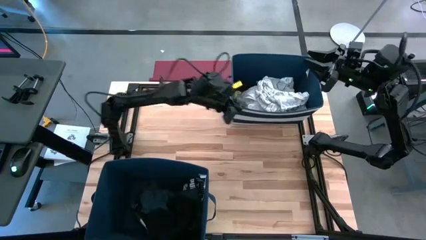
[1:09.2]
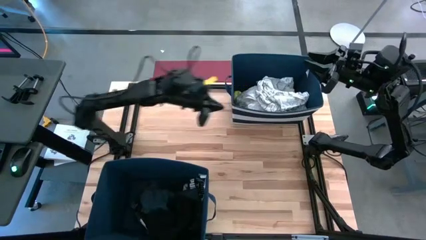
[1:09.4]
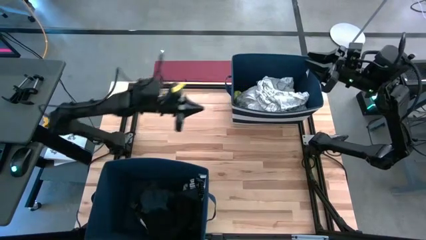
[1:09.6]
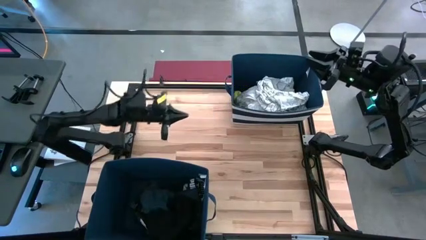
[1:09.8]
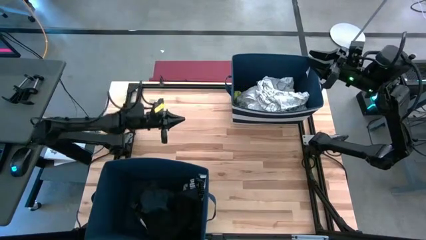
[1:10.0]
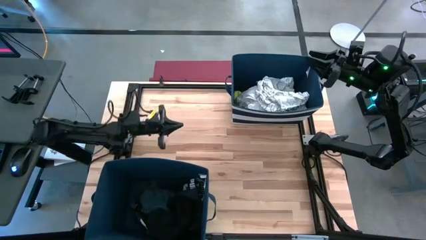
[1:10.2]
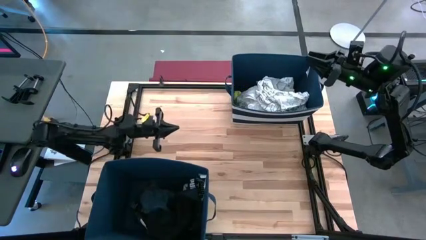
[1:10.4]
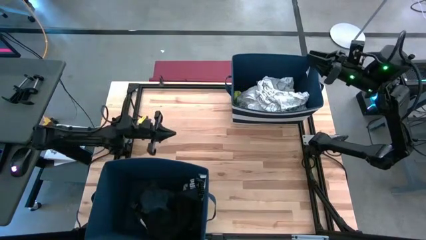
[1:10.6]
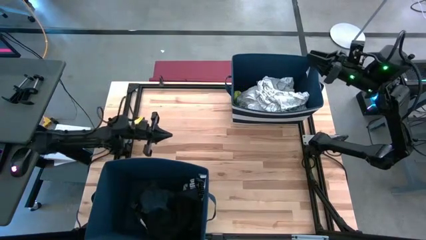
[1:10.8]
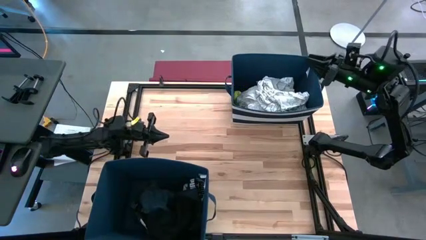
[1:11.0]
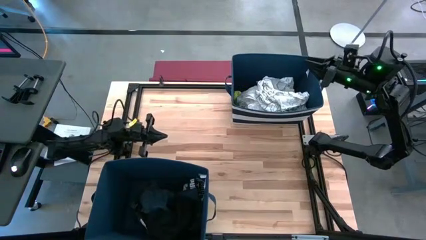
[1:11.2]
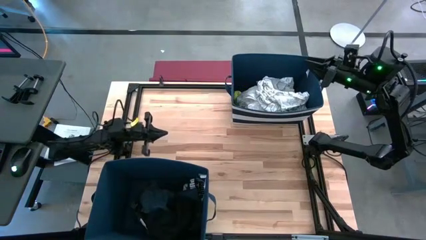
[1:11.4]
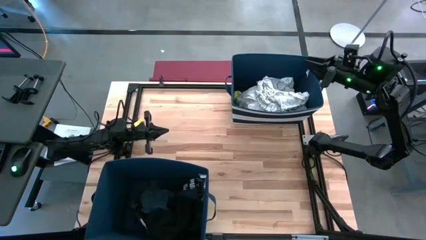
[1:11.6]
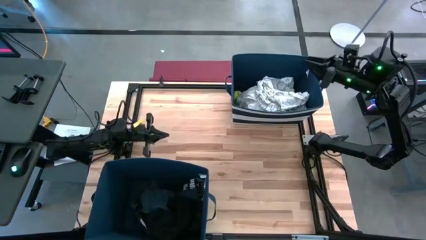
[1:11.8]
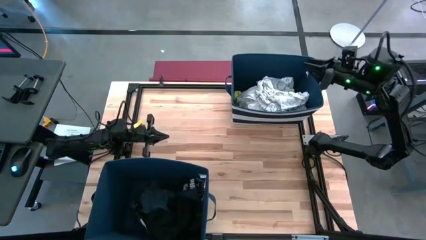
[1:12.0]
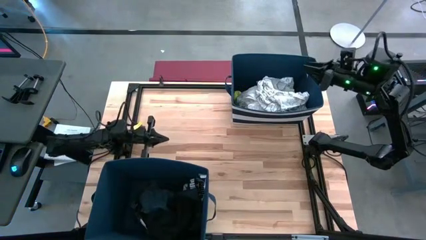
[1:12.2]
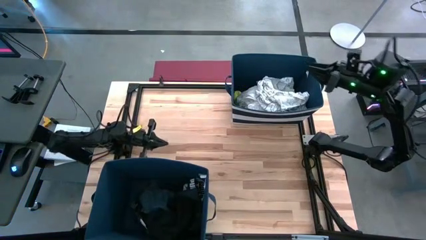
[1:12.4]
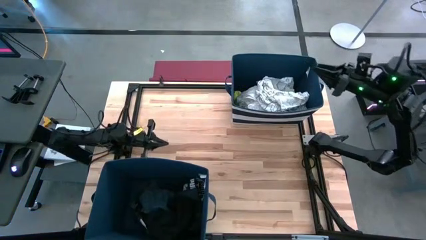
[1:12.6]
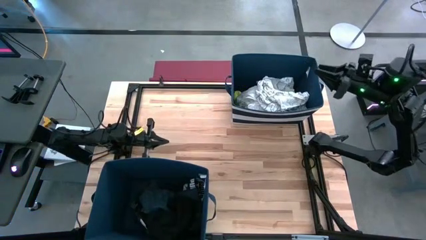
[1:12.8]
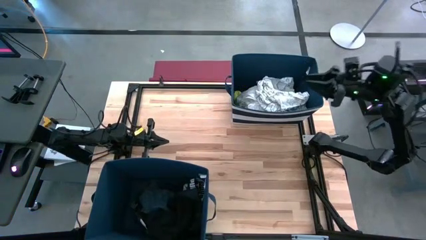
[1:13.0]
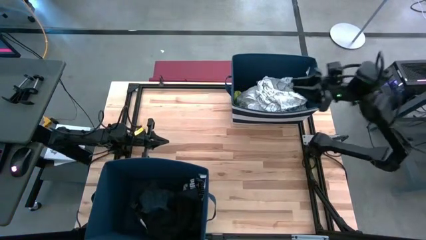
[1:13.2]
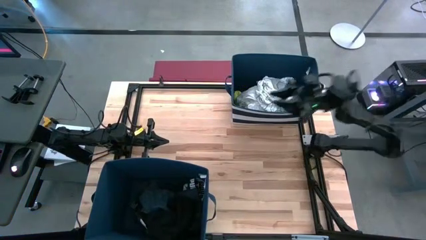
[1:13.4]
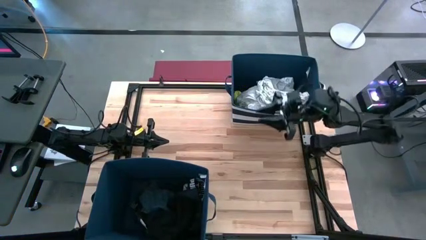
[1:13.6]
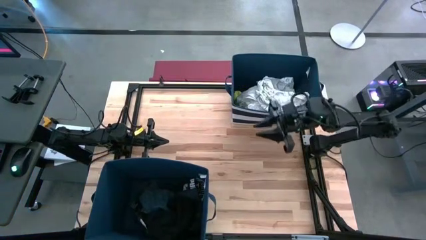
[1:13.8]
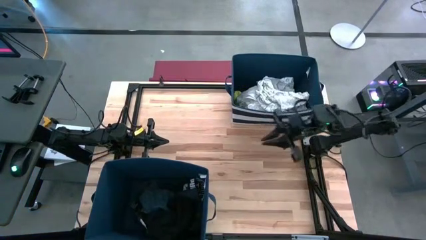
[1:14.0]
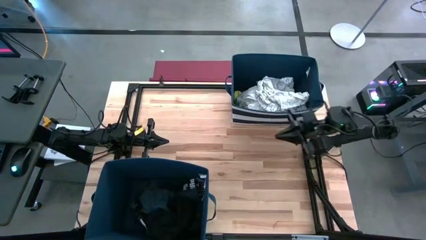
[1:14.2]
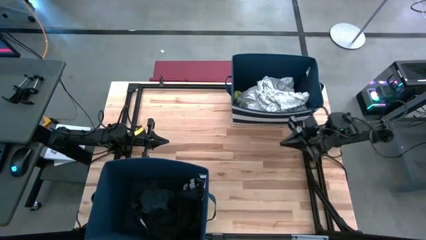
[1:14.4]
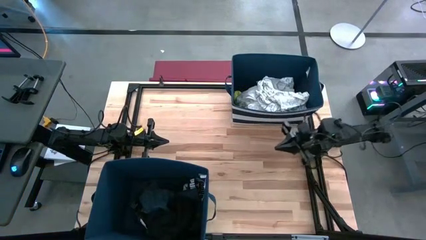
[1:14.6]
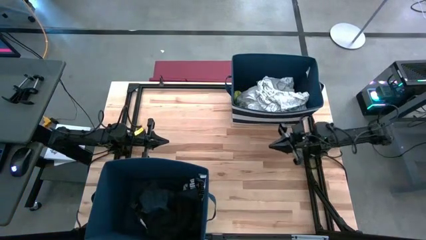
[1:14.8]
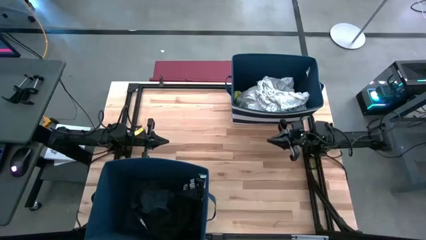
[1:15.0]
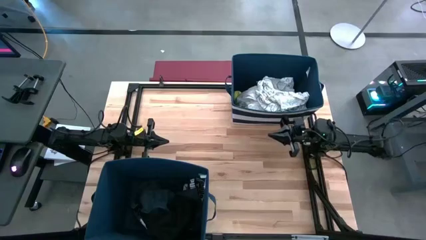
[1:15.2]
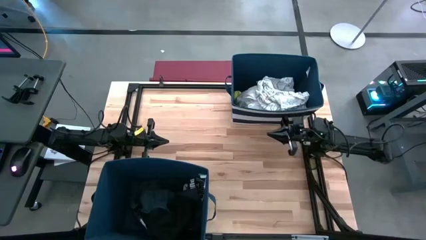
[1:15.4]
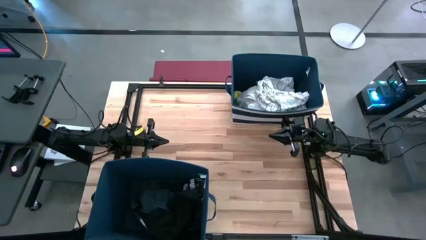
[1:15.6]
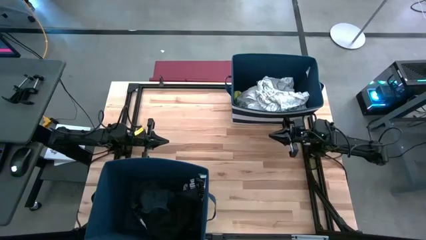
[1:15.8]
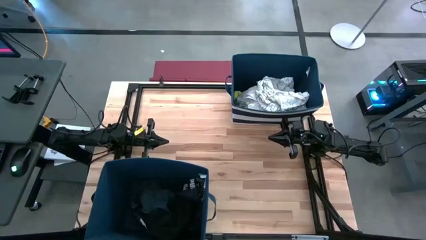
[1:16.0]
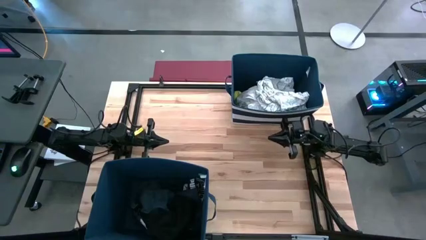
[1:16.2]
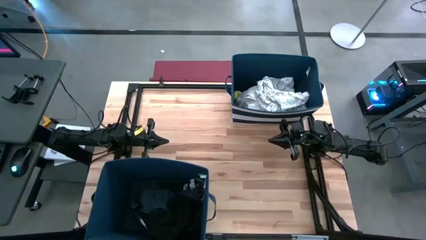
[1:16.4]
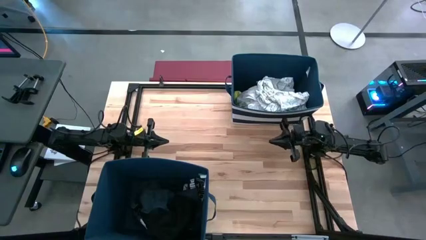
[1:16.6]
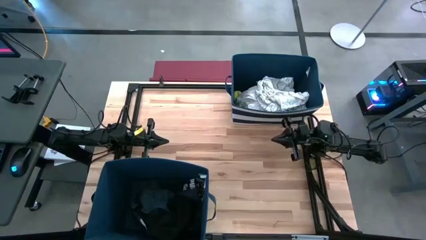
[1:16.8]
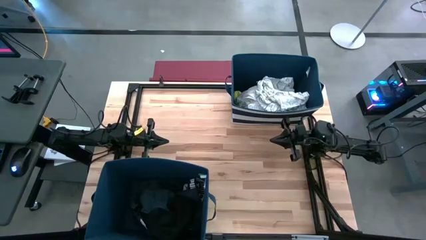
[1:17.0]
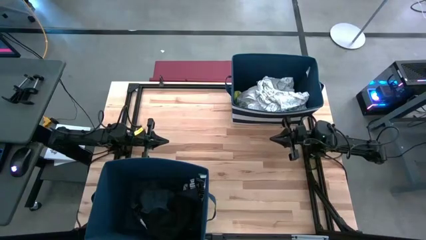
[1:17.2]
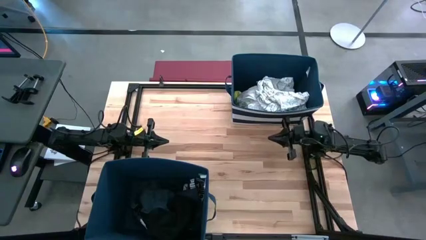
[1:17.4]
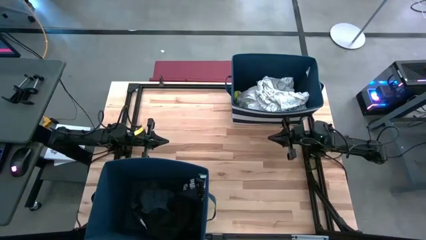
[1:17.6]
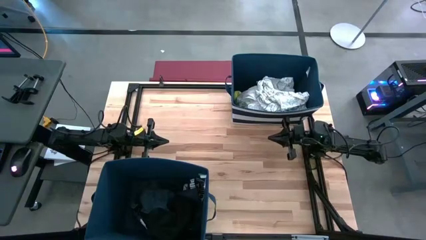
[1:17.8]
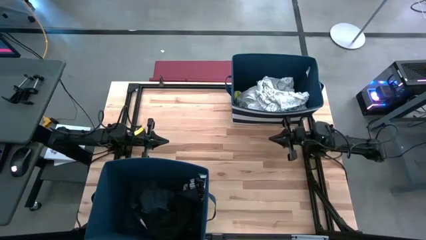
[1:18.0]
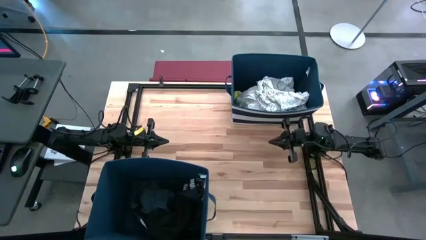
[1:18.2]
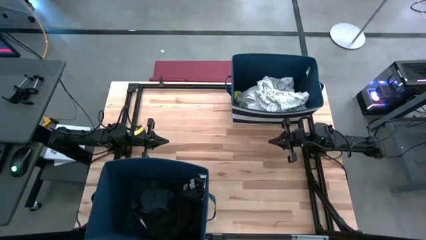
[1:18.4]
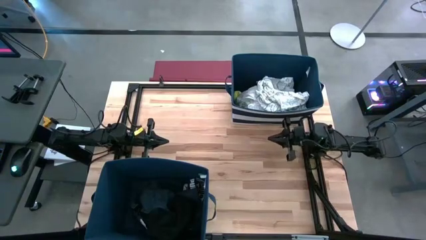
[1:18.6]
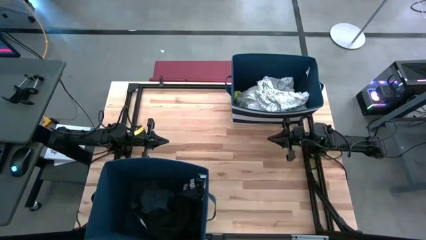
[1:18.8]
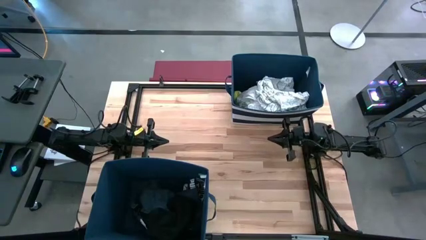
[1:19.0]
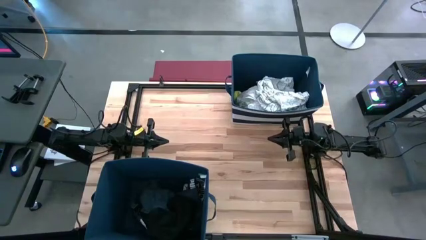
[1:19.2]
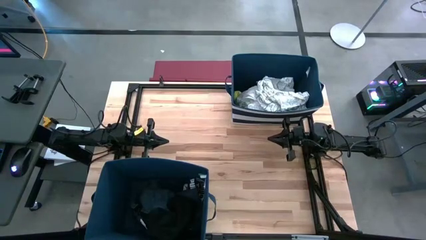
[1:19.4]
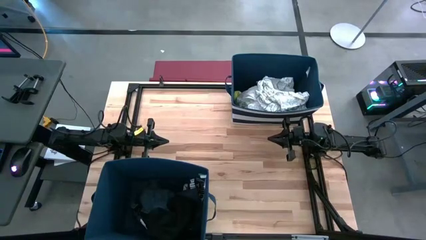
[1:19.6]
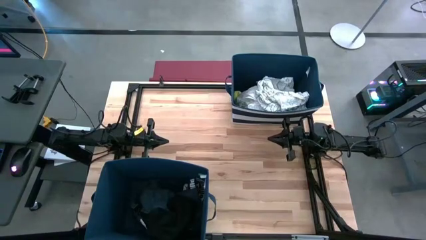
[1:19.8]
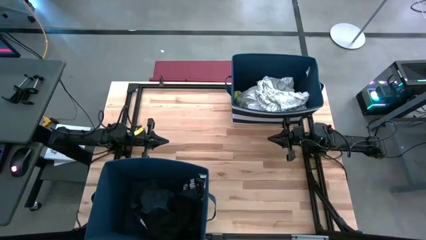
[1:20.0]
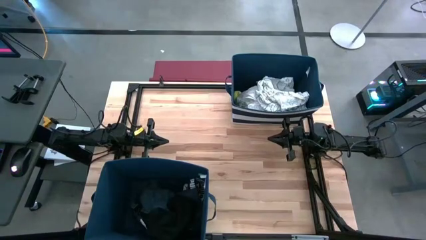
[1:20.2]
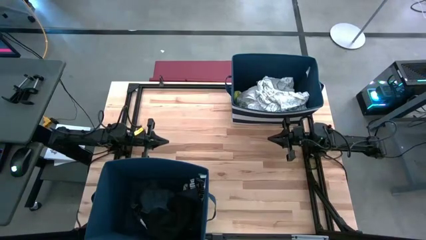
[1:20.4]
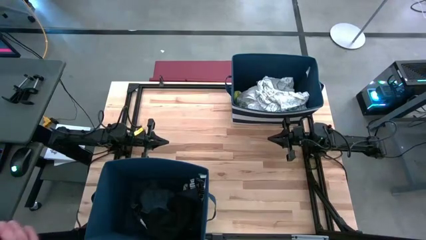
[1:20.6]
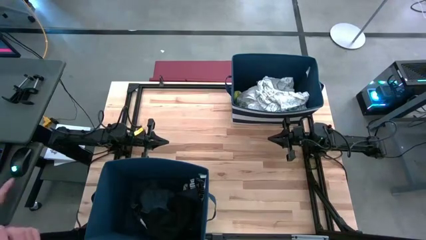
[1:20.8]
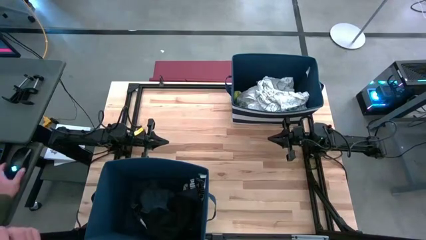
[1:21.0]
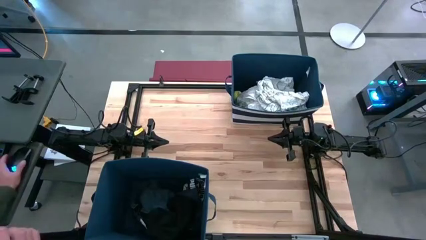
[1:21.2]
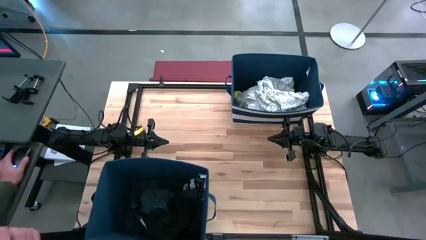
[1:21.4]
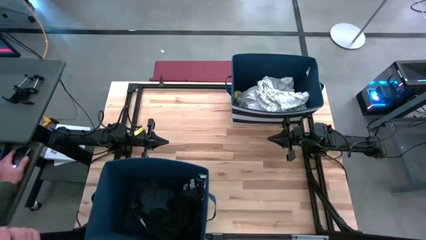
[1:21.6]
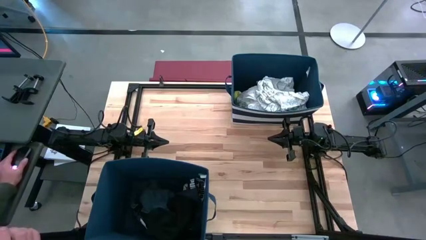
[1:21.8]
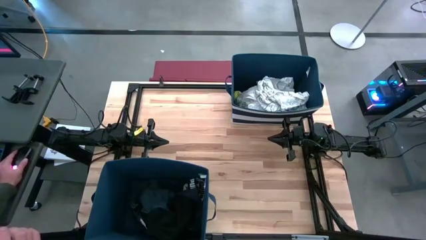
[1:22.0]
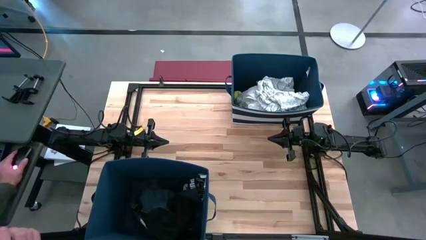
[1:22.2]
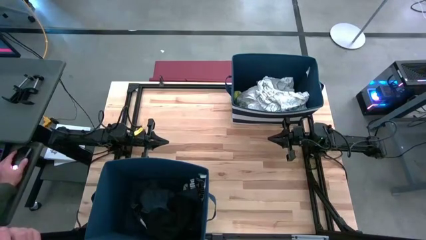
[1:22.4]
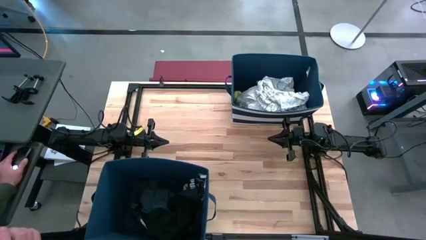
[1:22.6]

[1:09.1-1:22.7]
Task: Sort clothes
Return to Home Position

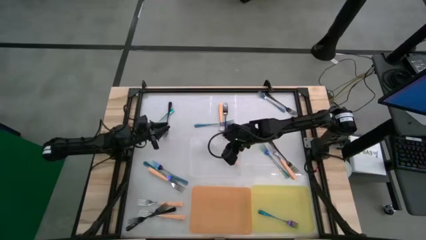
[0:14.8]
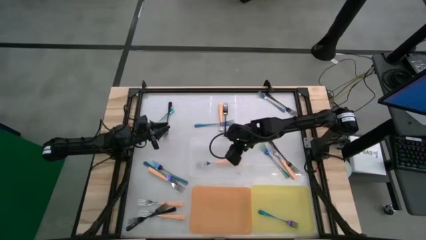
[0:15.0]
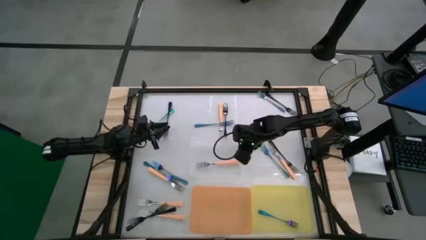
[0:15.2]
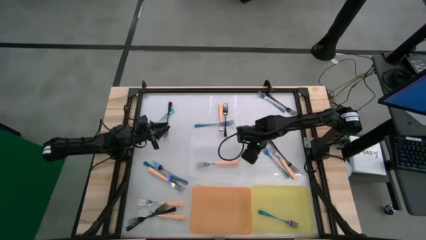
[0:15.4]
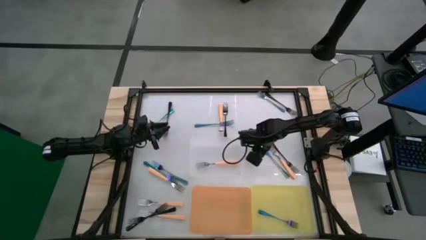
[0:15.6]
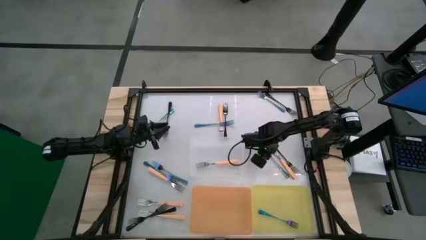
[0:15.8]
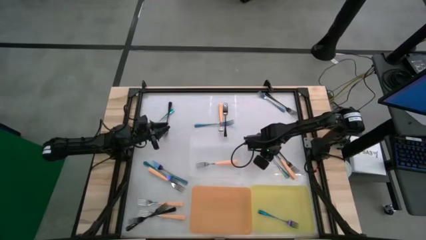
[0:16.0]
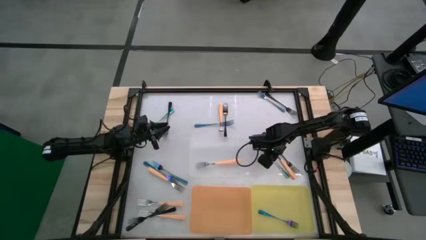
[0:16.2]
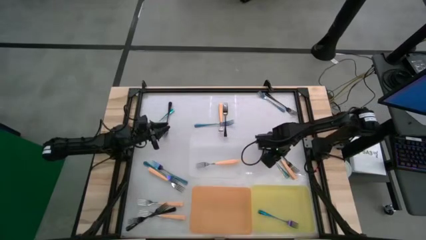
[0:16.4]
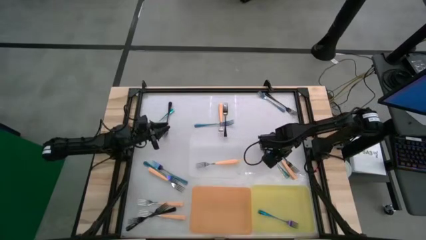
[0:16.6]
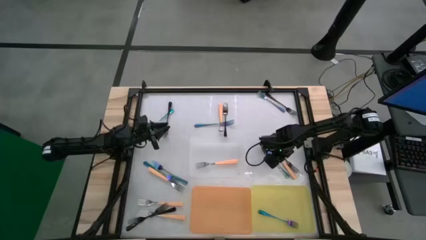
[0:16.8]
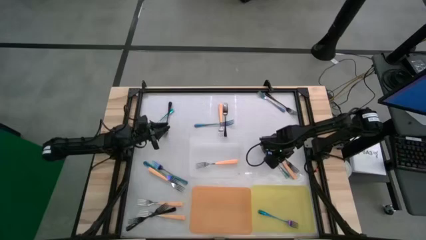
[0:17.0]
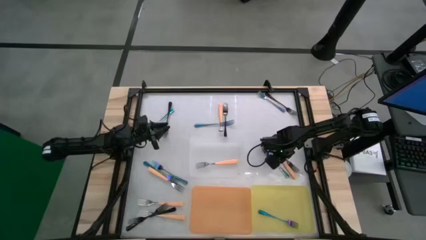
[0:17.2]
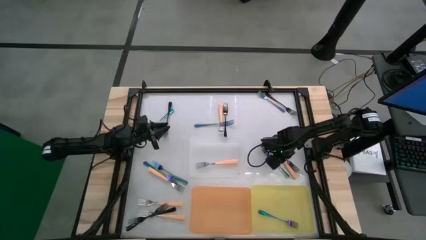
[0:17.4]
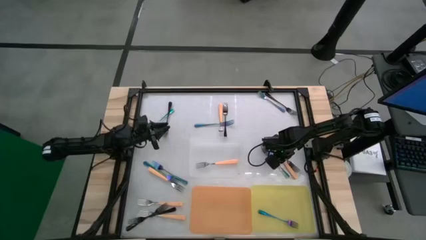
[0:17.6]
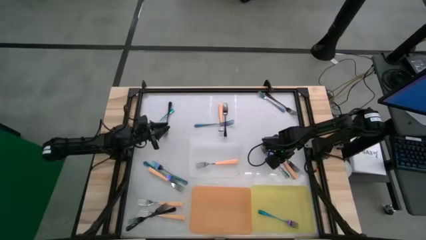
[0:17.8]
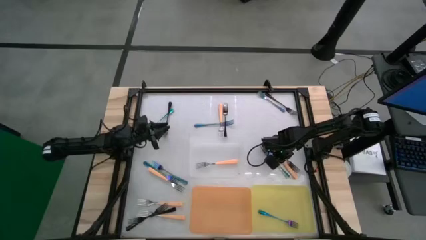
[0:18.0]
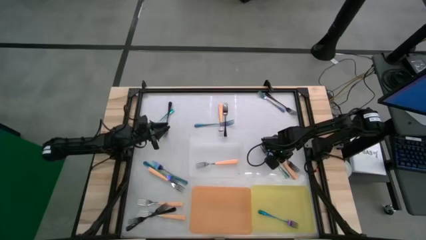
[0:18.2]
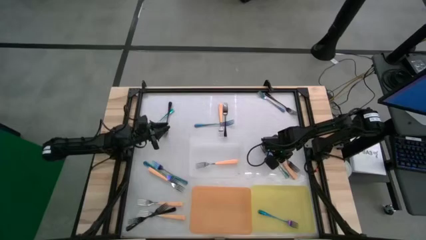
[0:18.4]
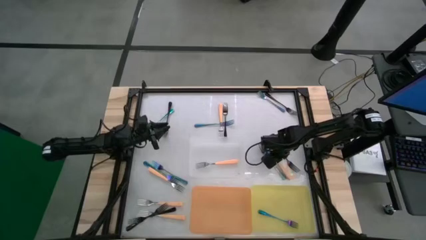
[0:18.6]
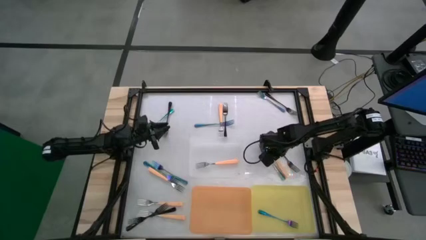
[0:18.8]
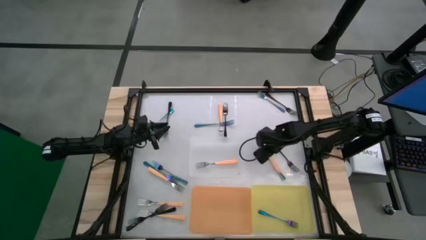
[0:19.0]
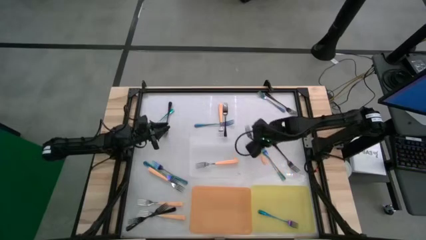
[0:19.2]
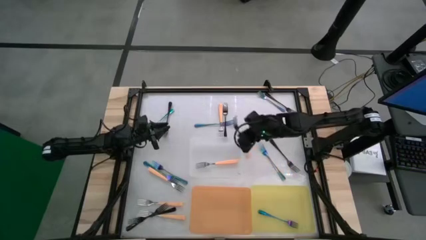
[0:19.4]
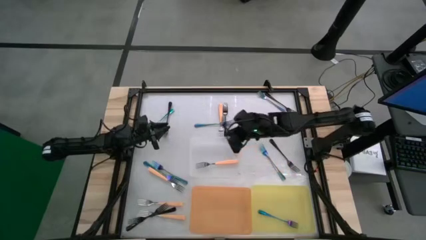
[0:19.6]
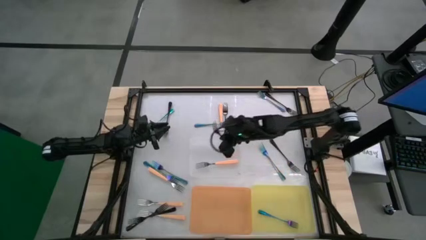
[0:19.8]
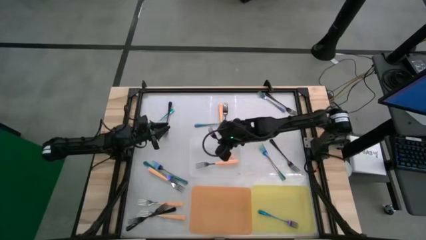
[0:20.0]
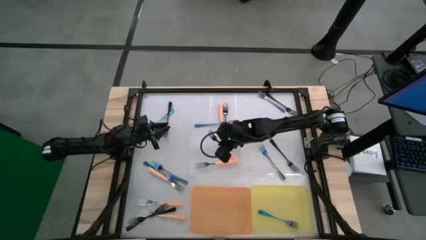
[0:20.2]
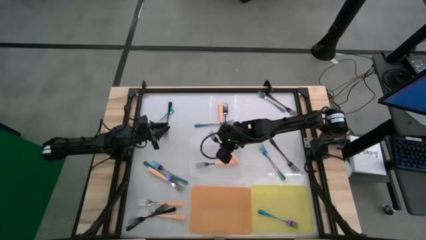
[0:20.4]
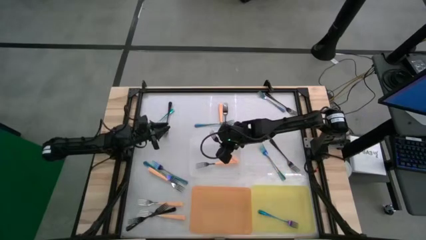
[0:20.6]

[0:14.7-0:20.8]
Task: Sort silverware by color (type)
Put the orange fork into the transparent bin
